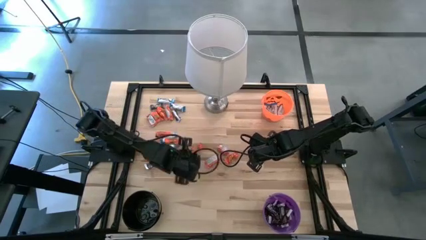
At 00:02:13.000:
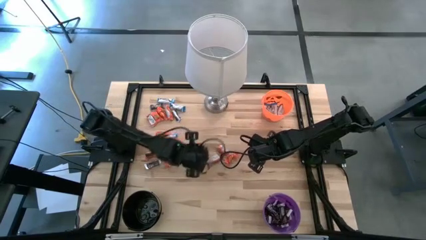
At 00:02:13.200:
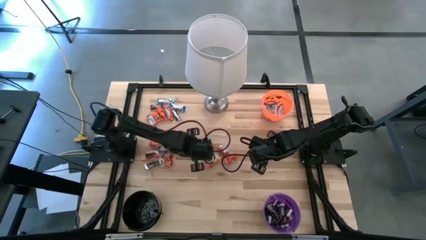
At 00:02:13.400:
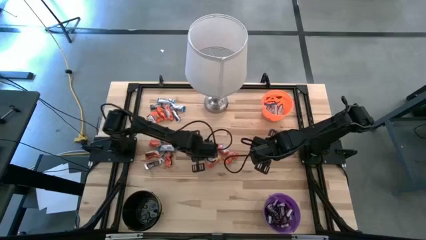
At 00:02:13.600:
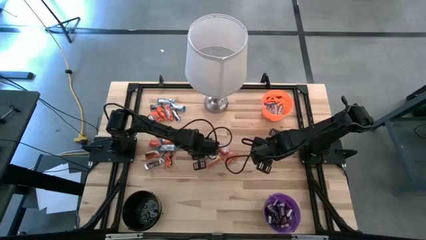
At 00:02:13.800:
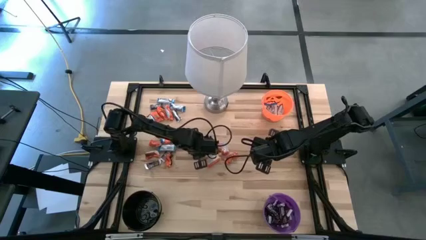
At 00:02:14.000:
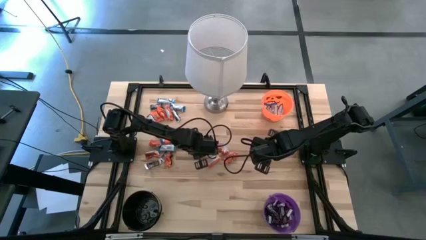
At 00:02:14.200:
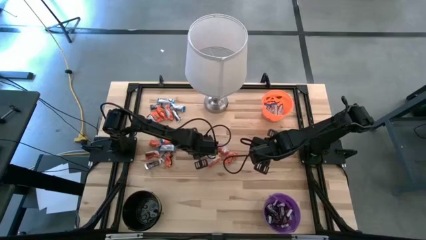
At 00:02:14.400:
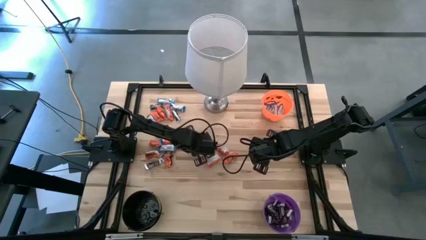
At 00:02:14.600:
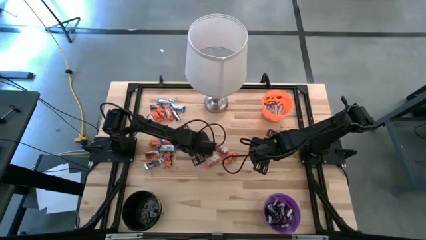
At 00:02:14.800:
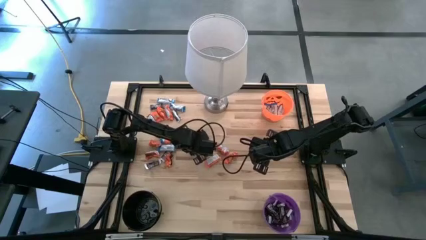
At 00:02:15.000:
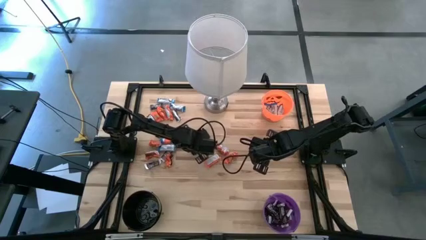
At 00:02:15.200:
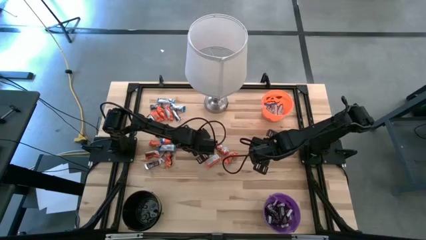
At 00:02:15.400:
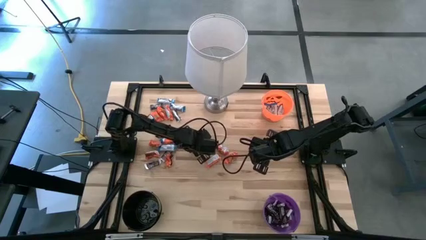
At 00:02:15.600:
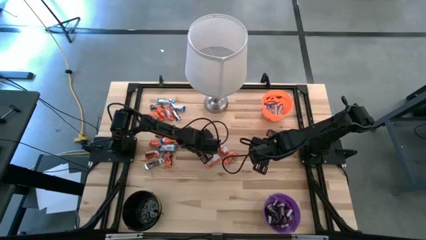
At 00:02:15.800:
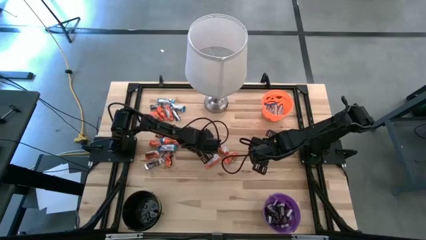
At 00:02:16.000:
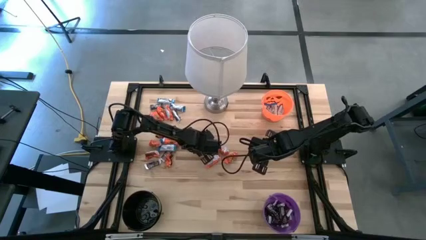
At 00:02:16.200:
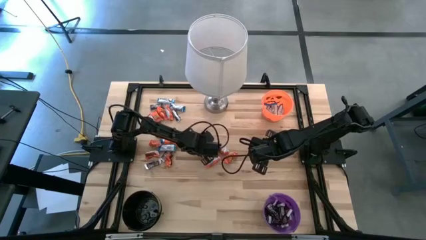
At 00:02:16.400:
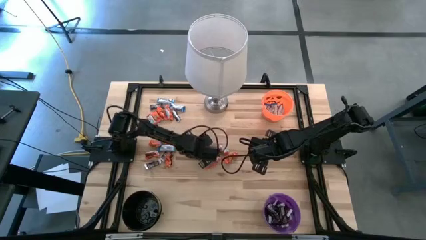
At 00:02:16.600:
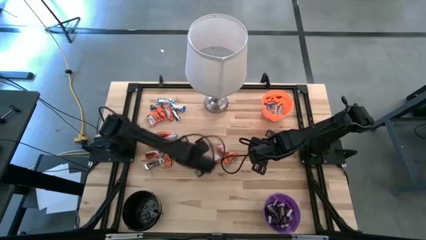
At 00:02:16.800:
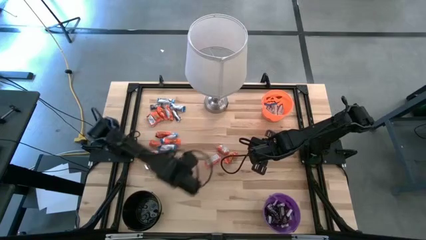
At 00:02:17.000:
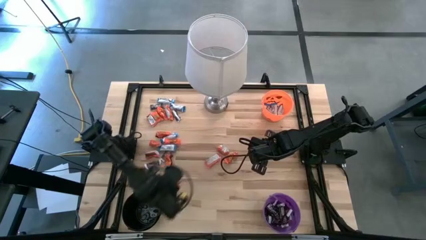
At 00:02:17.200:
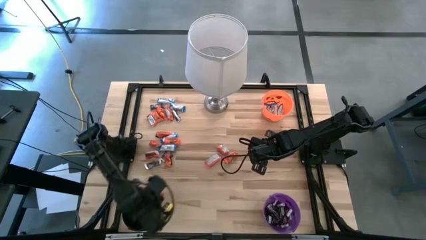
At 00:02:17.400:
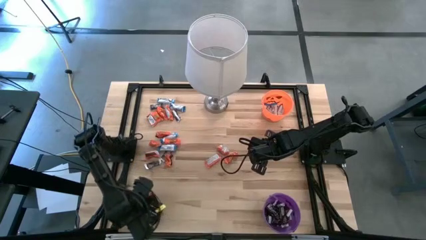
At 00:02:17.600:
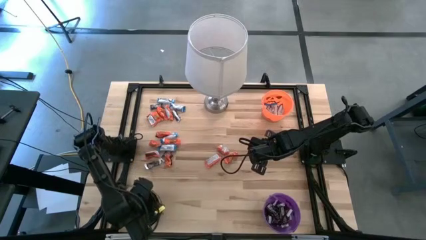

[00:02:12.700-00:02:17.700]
Task: Sort candy
Put the orange chocolate bar into the black bucket

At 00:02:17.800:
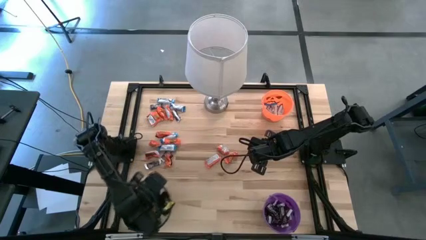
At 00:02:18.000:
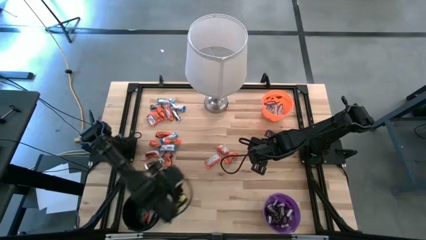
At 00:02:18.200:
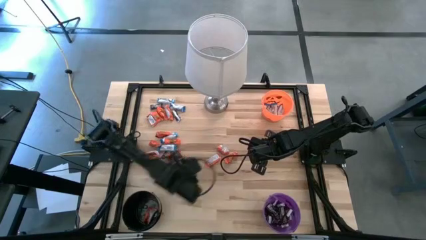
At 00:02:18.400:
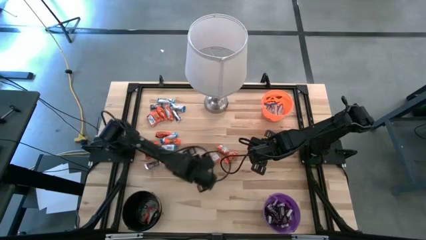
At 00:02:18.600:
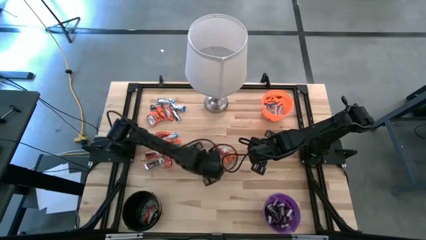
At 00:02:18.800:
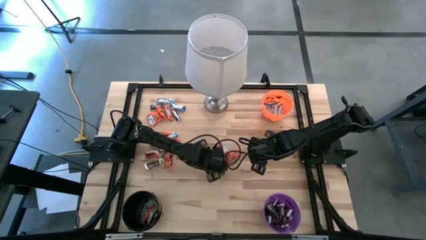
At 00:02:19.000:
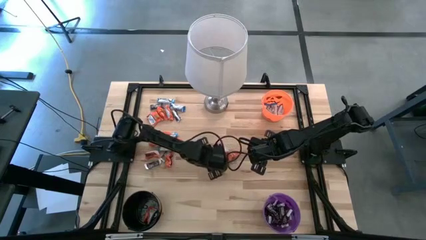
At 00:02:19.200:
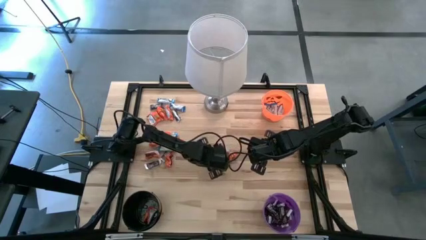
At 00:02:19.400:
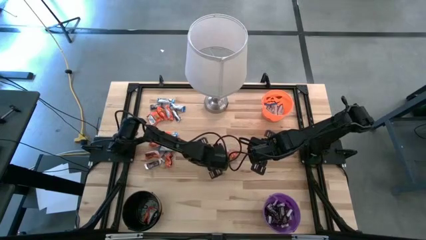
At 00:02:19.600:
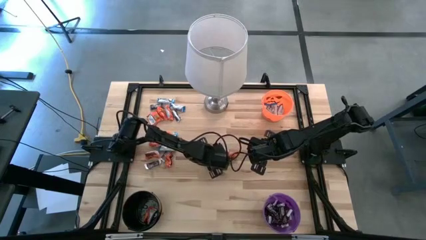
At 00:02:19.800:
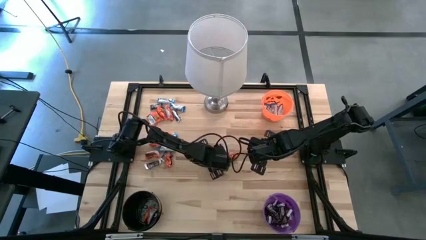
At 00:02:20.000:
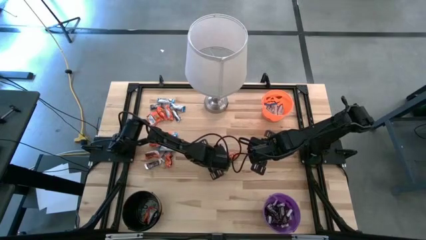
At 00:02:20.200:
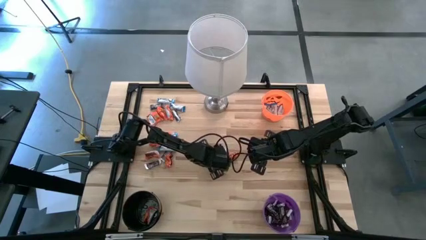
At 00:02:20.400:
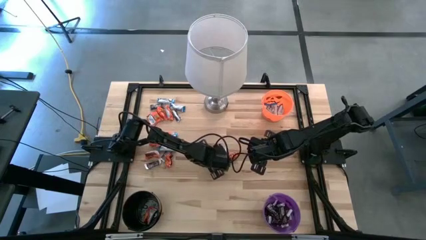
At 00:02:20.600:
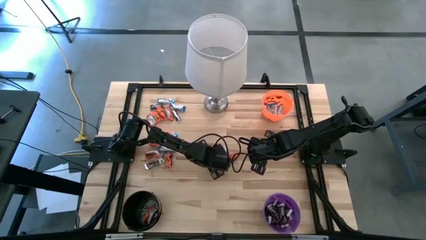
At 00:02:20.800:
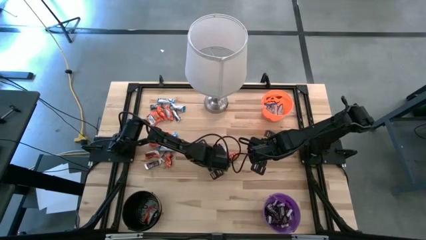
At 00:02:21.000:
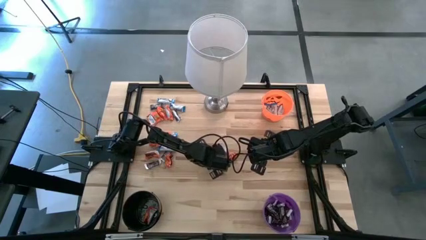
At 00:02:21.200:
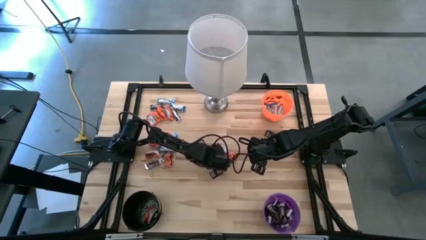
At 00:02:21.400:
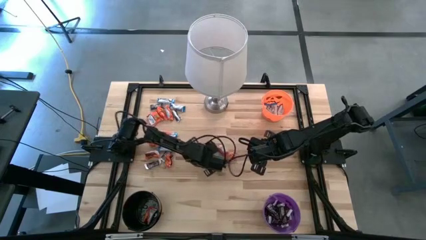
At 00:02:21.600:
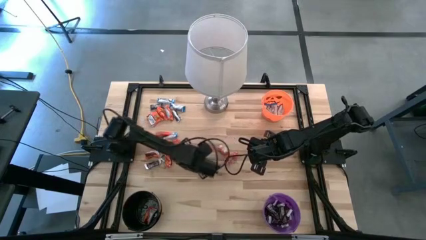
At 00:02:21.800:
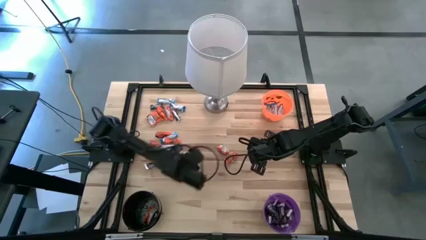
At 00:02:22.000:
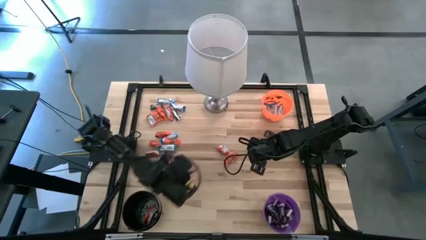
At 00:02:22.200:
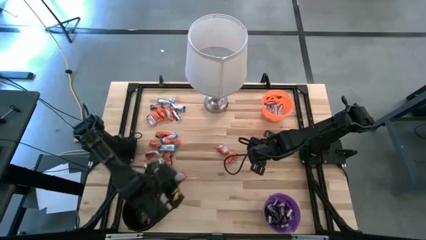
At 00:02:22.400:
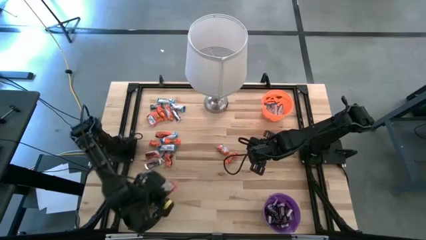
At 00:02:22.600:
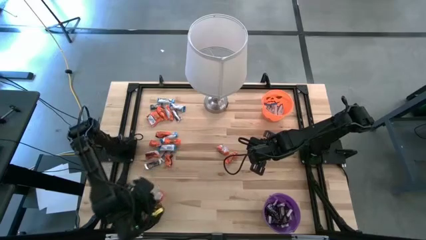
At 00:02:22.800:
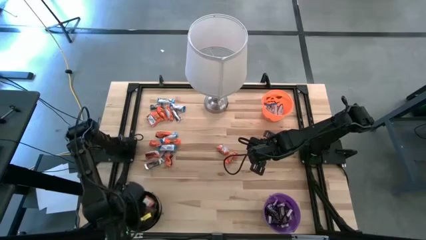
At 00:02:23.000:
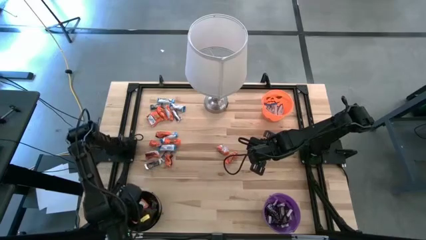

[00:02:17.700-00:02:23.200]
Put the orange chocolate bar into the black bucket

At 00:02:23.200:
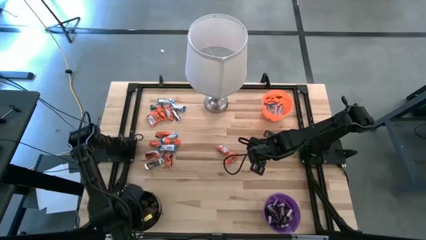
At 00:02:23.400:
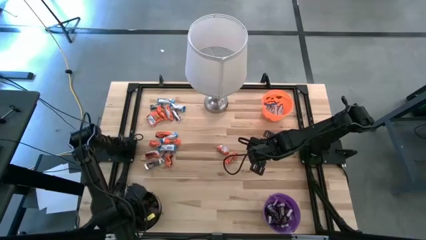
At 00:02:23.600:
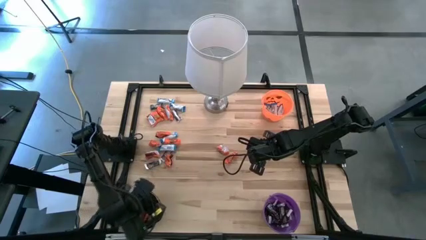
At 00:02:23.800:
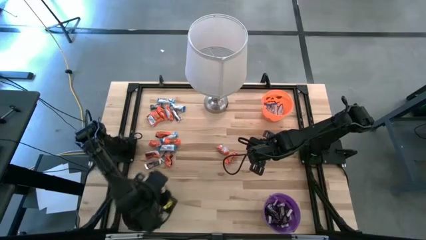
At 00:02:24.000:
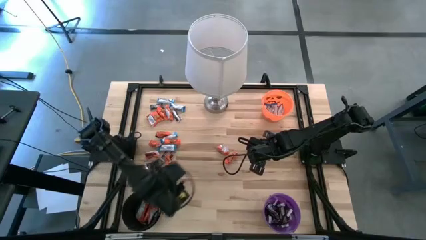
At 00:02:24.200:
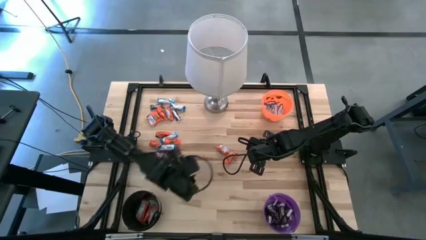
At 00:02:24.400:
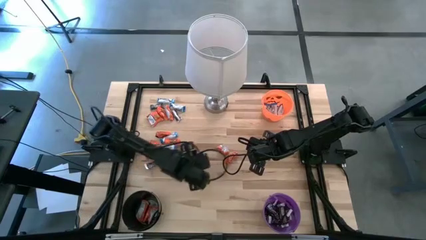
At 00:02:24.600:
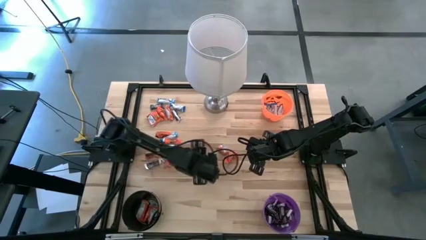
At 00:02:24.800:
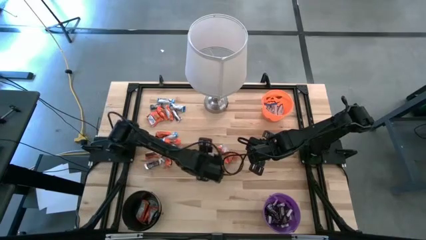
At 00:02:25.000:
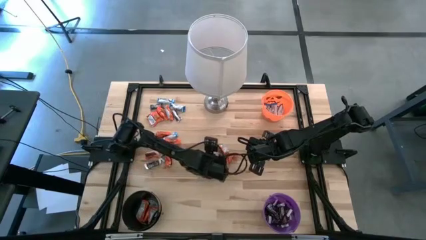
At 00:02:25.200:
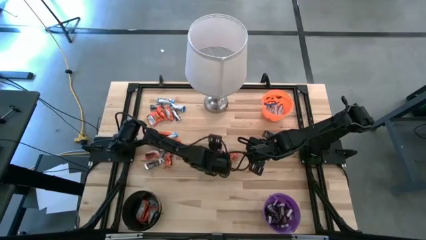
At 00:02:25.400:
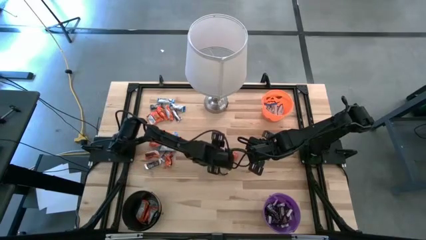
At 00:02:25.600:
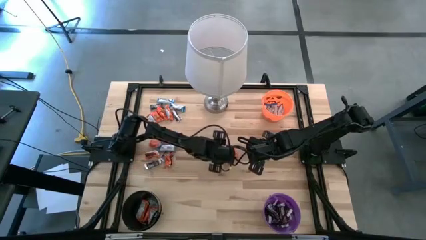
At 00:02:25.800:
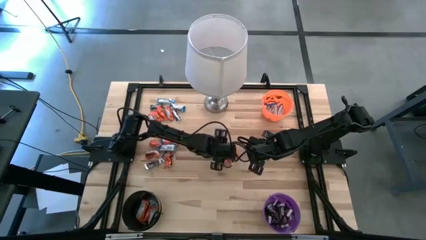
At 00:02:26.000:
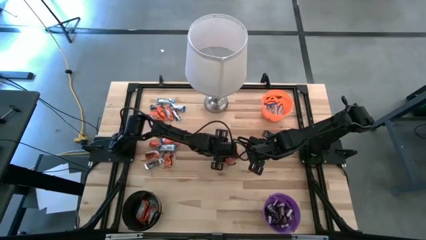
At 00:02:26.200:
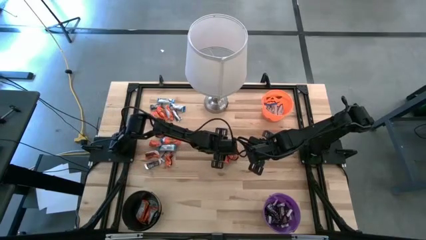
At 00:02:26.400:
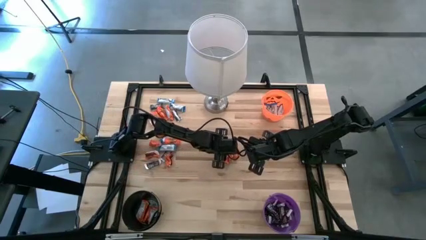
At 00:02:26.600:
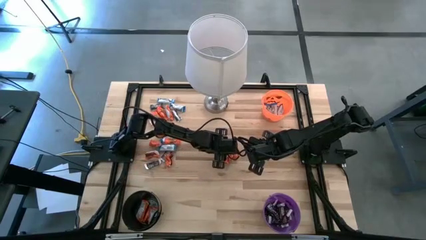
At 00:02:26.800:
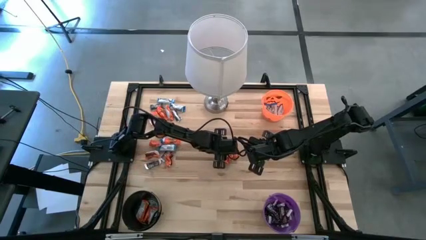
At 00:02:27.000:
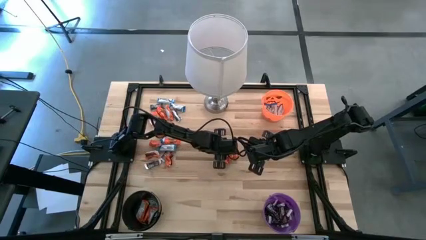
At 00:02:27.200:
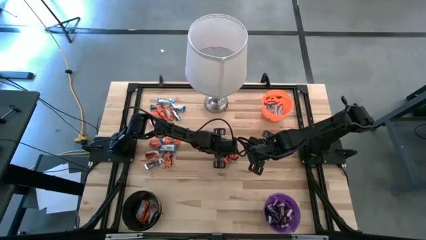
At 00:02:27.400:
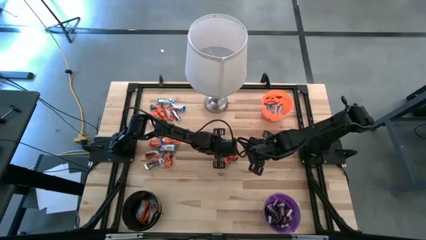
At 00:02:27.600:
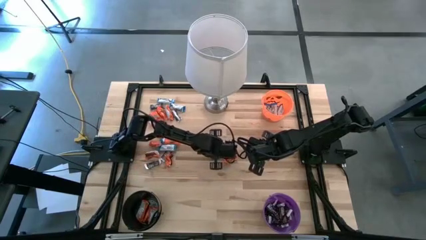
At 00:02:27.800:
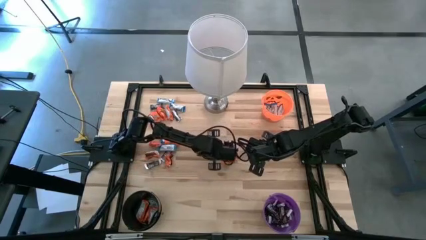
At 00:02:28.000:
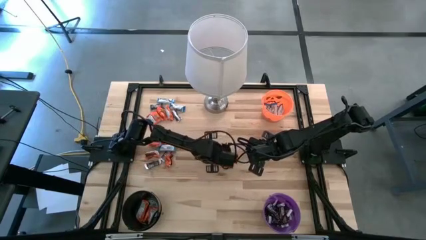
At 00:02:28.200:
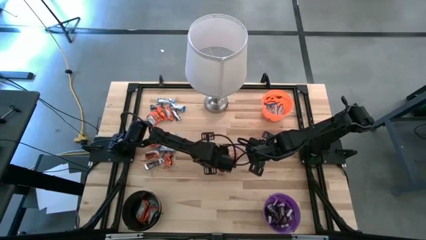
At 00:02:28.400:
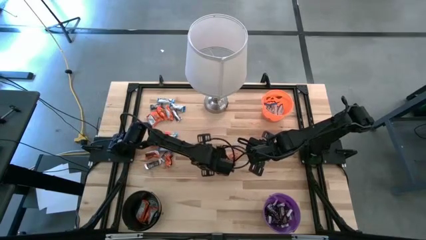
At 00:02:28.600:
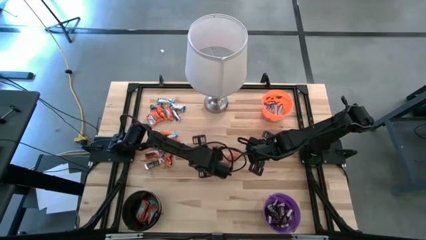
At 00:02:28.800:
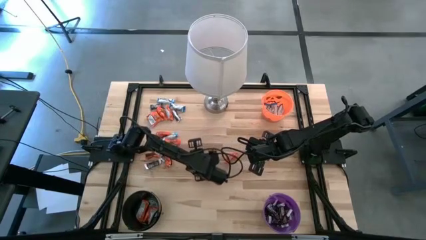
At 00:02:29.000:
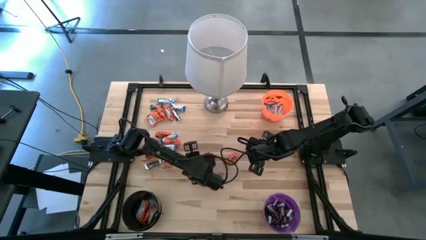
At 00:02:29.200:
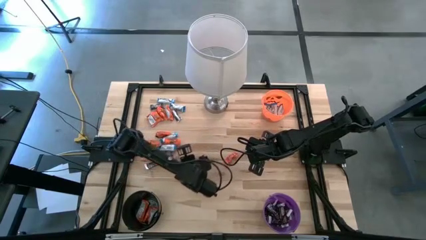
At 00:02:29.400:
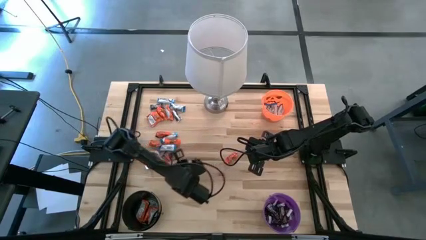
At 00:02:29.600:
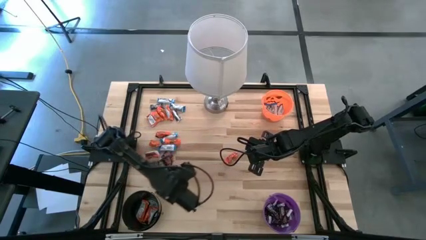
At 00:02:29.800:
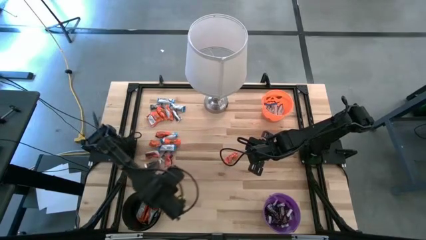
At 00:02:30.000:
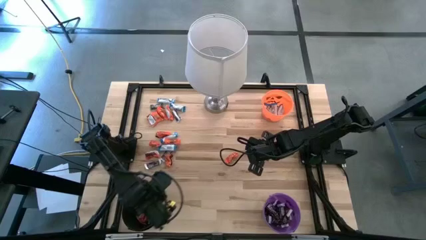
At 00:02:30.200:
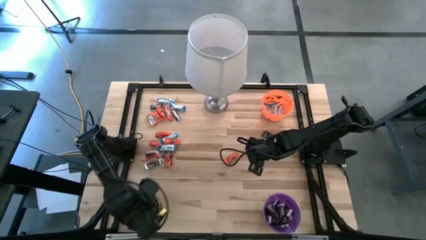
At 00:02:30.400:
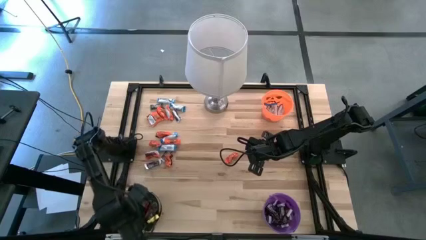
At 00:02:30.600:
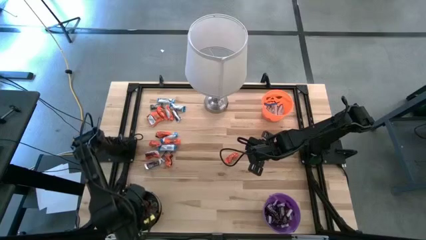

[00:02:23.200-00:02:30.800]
Put the orange chocolate bar into the black bucket
